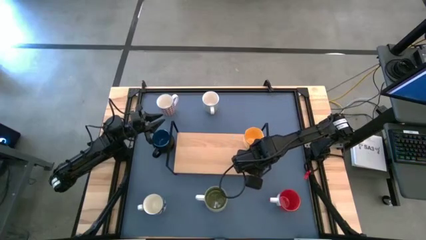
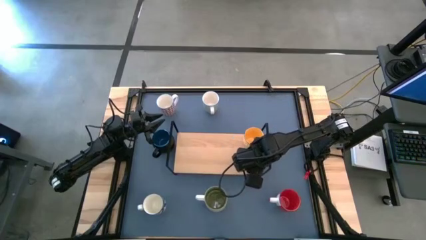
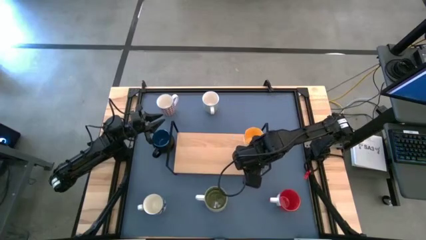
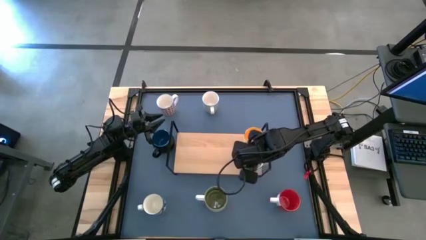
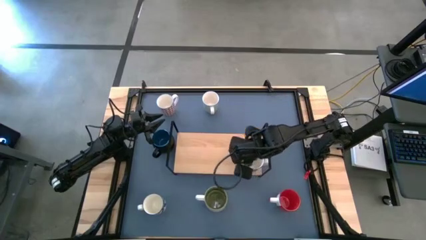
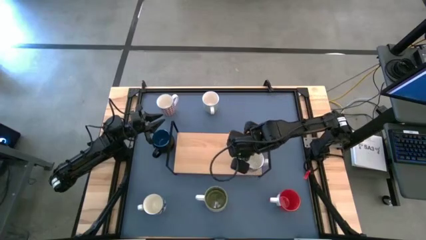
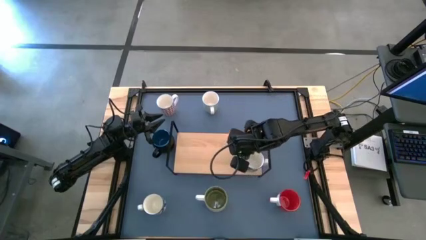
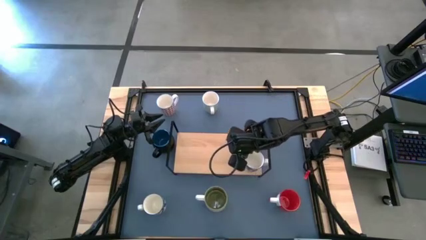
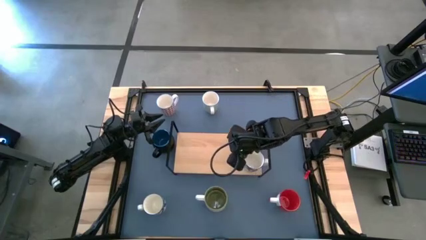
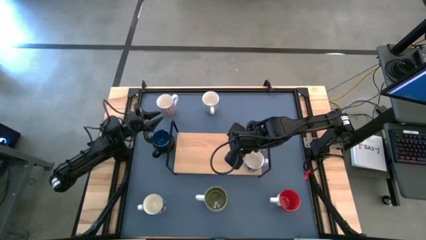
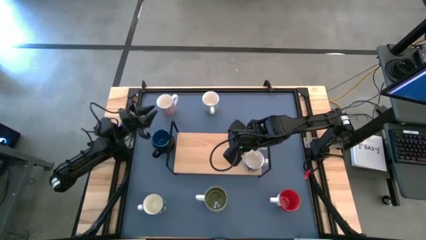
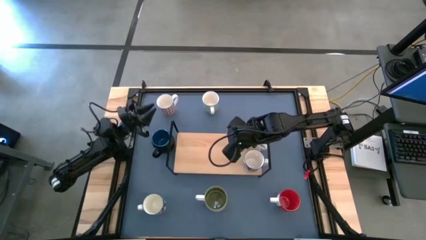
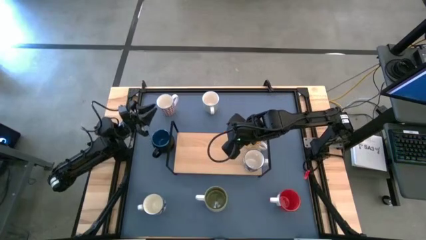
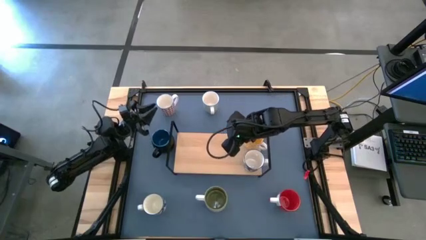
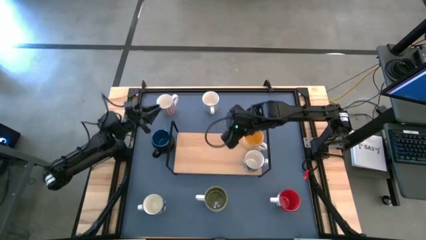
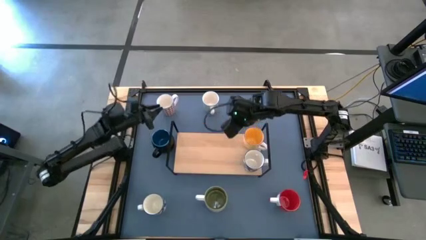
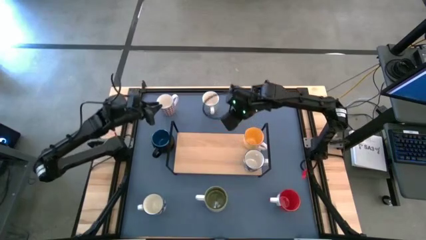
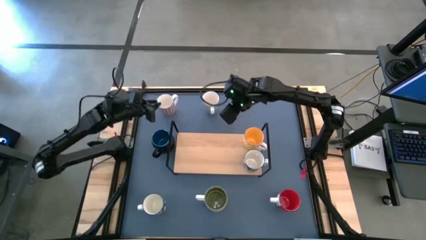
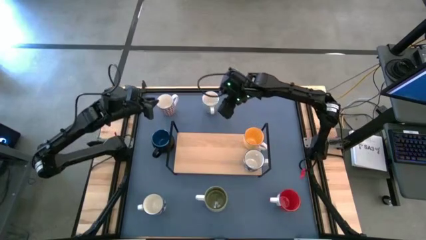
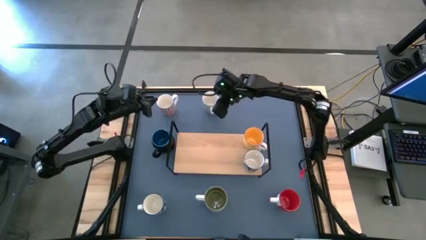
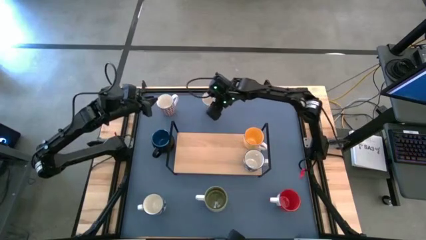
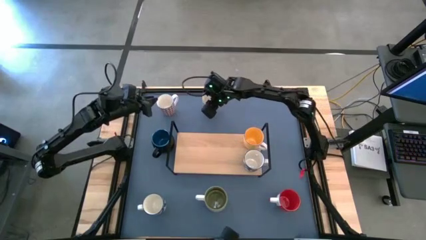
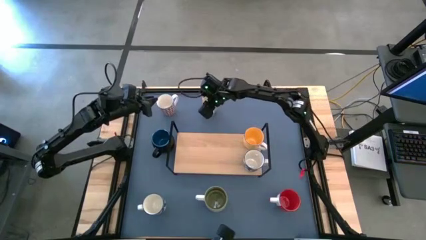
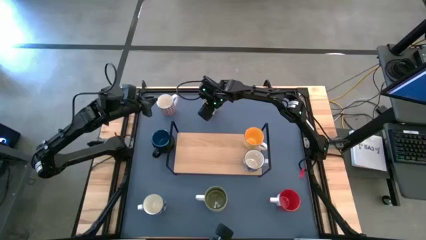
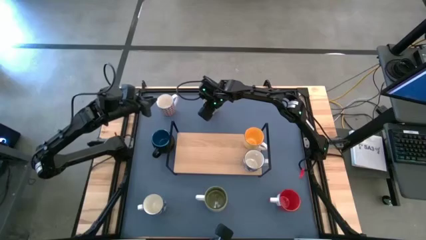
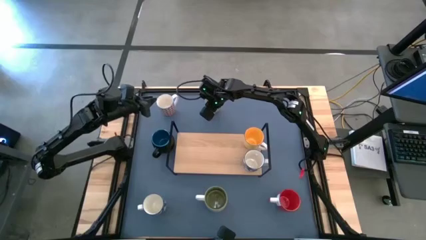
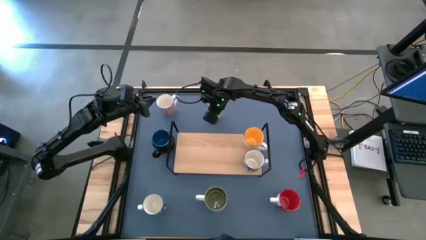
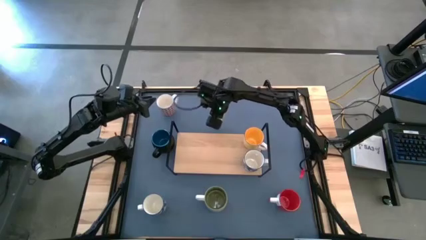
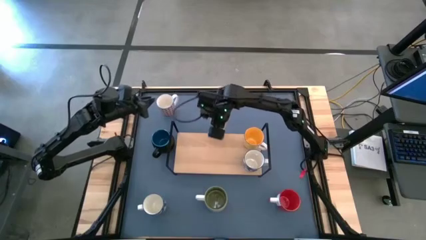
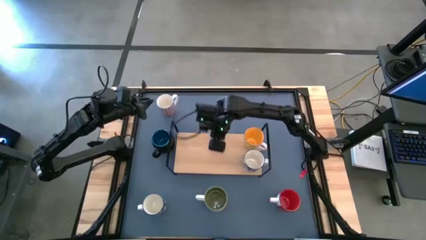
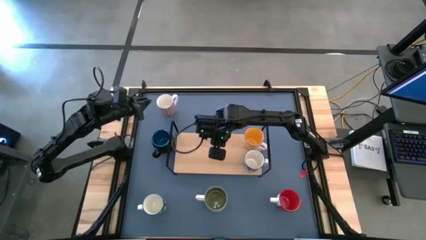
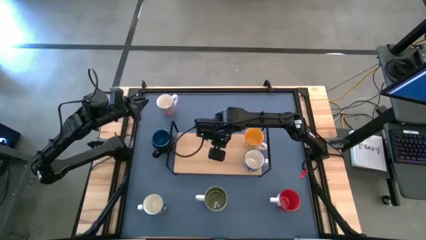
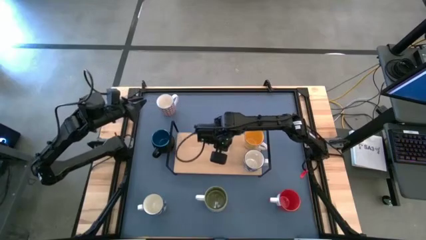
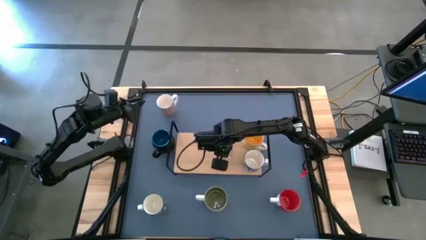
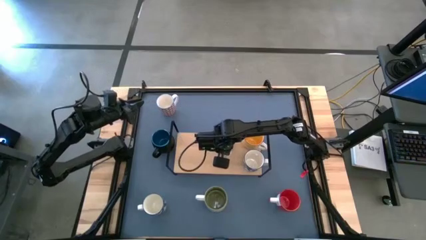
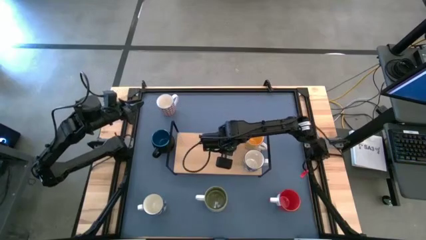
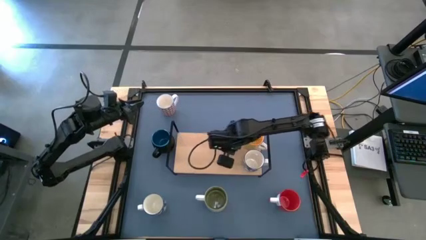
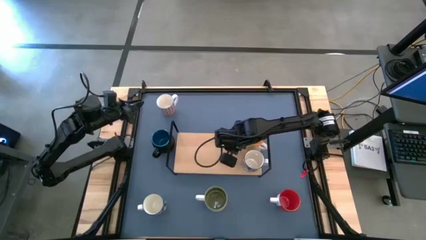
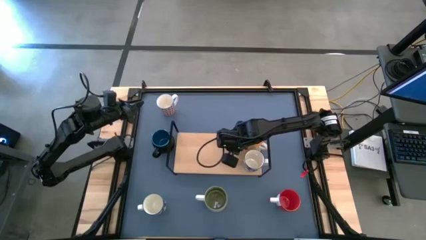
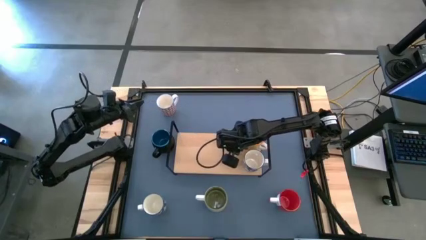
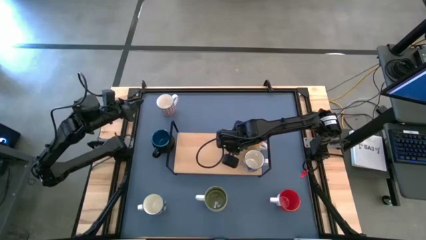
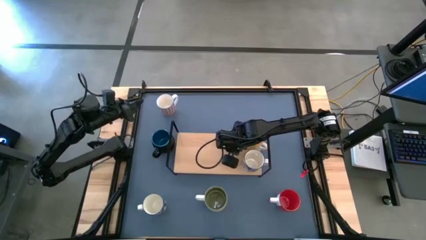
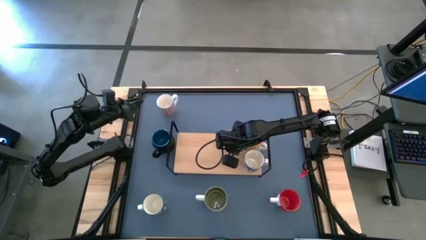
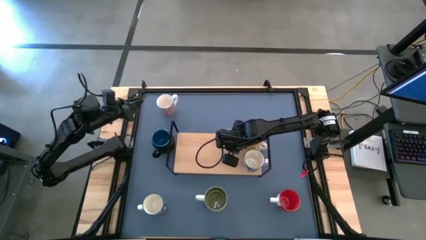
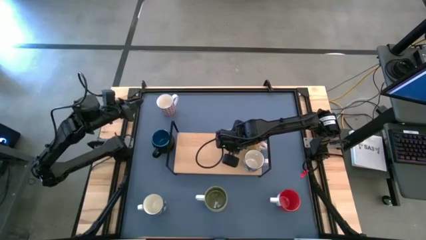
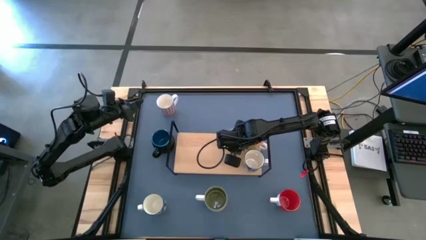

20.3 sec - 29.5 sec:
Task: Place coffee mugs
Put the light blue mug on the shelf

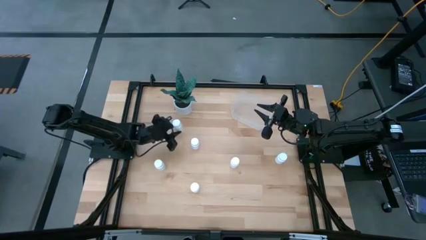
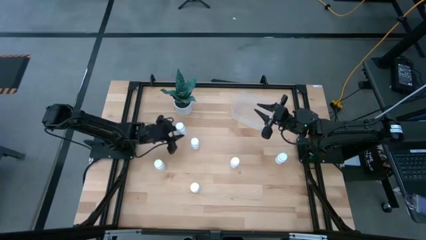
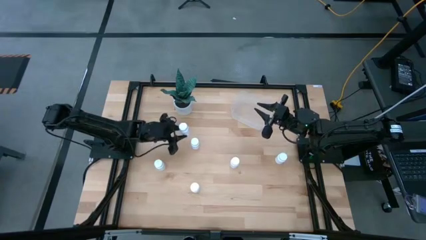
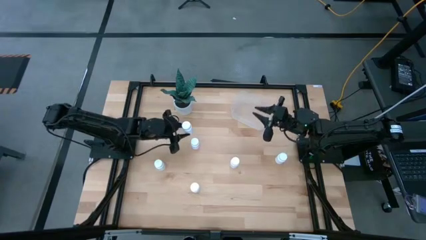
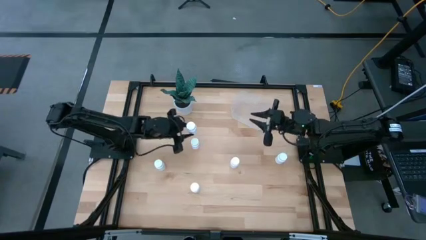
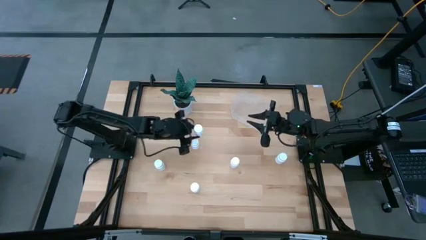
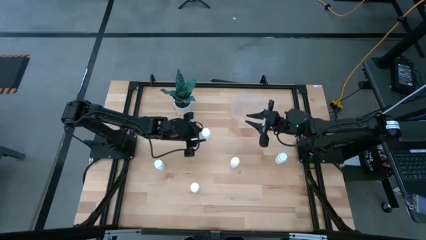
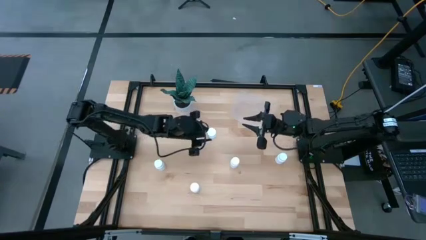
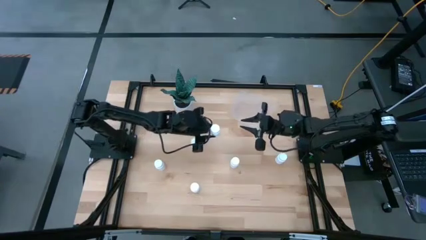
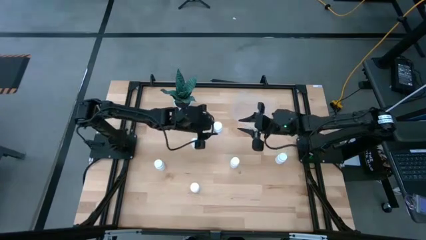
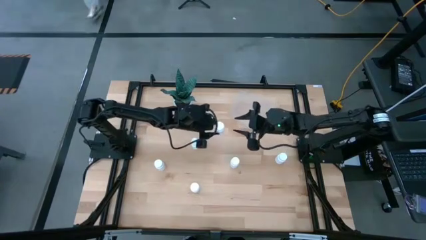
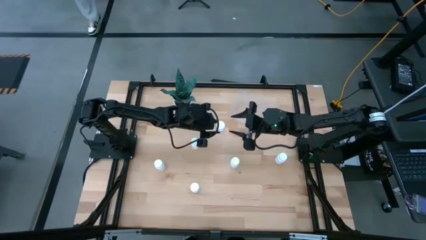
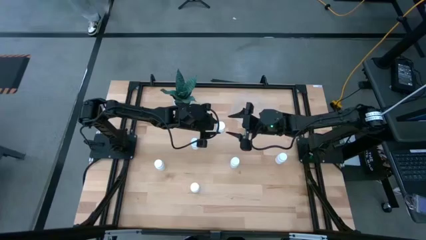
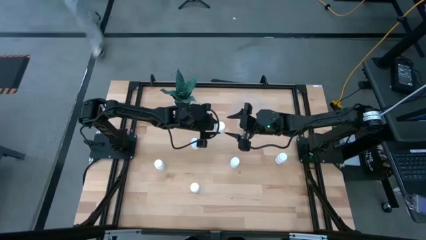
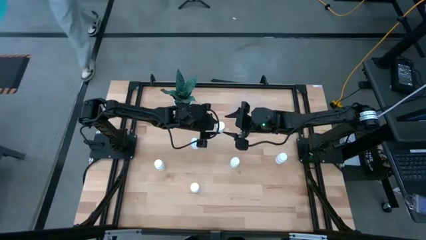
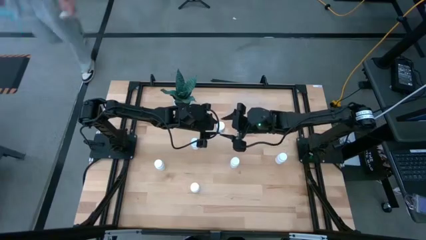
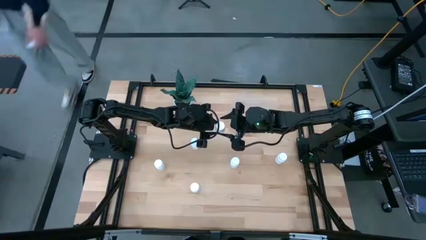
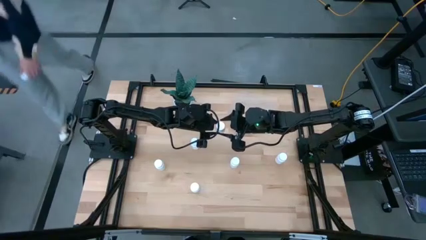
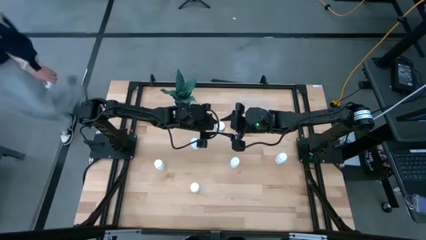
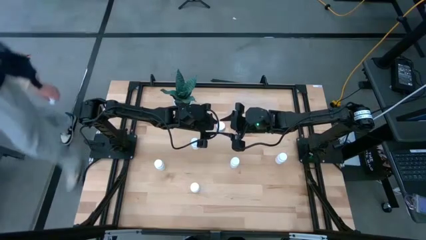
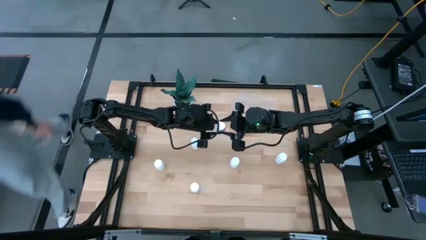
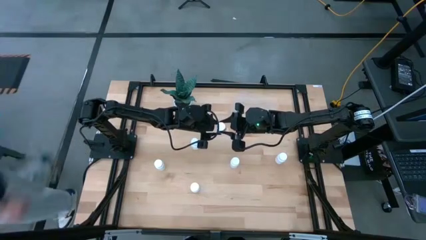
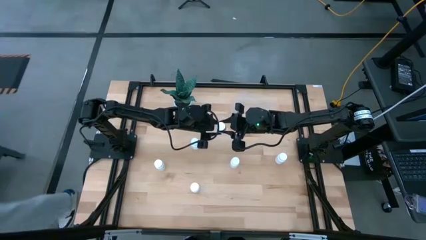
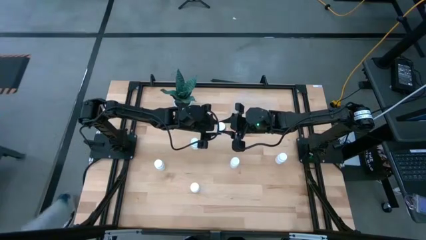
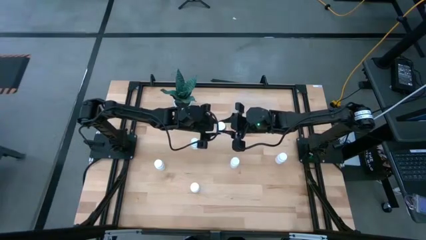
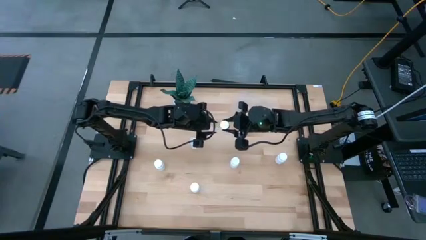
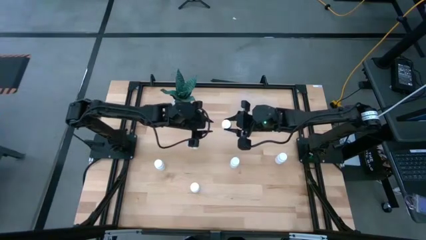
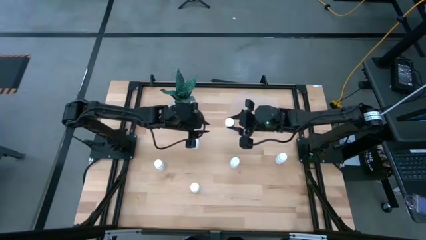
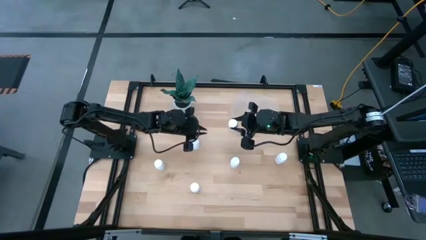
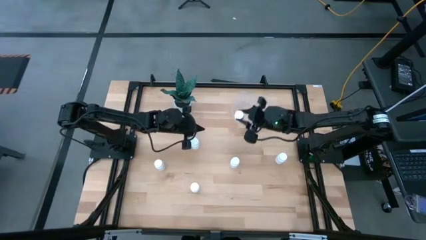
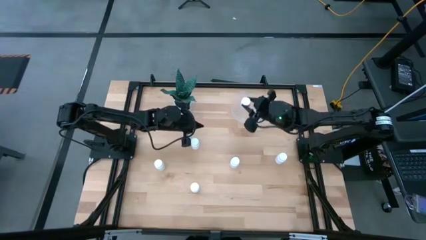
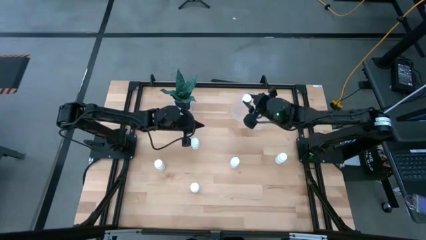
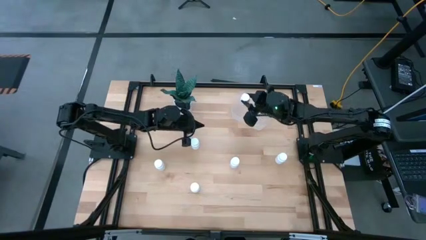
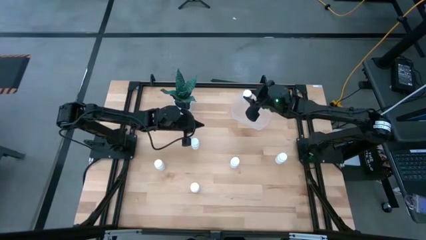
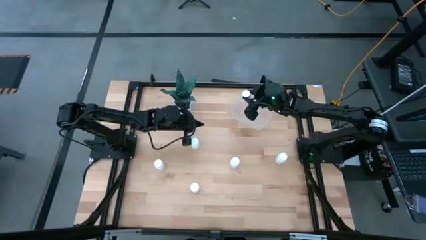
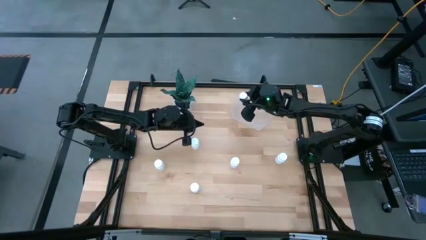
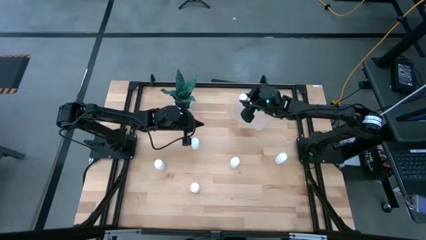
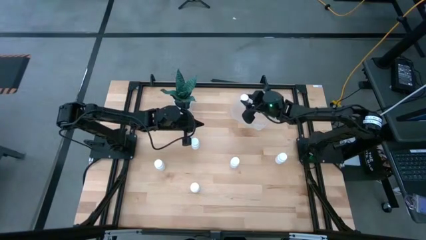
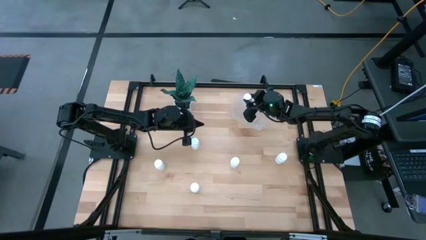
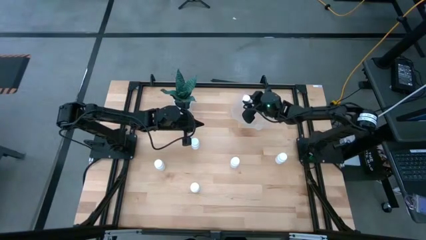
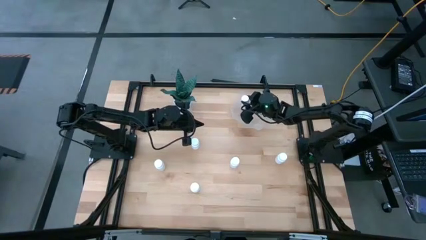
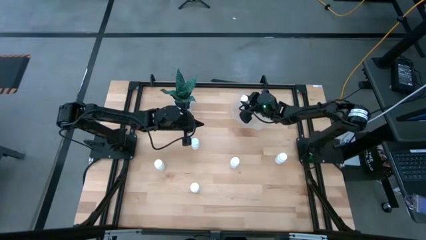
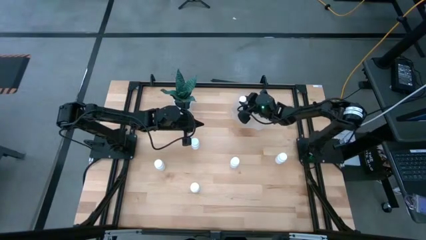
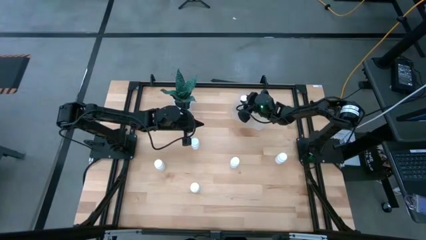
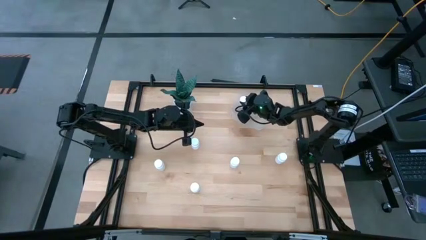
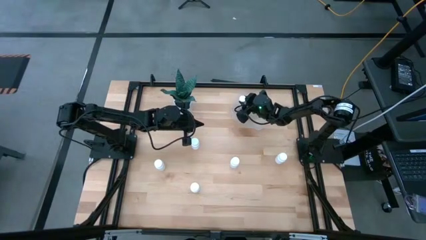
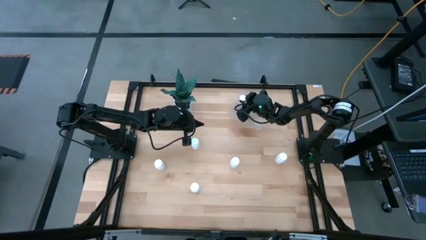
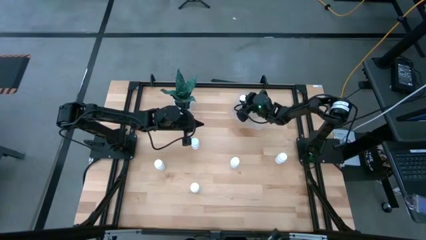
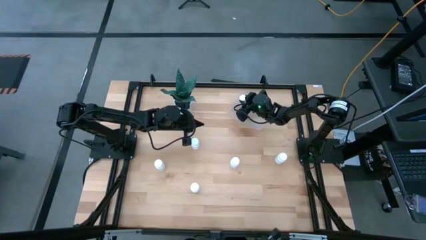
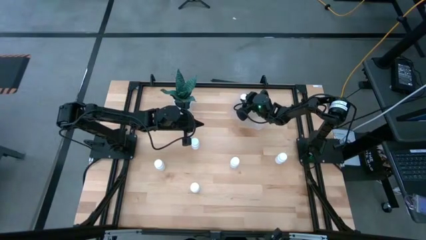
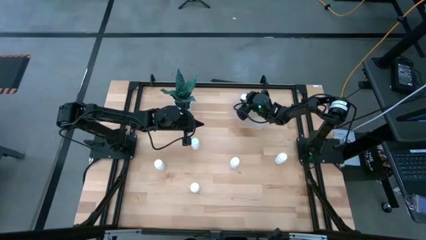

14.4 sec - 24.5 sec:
Task: Pick and place pill bottles into a basket
Put the white pill bottle into the transparent bin
